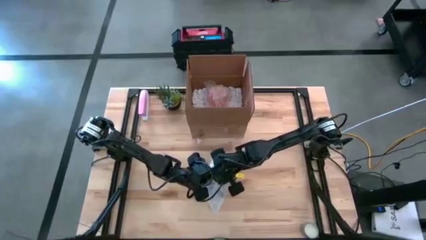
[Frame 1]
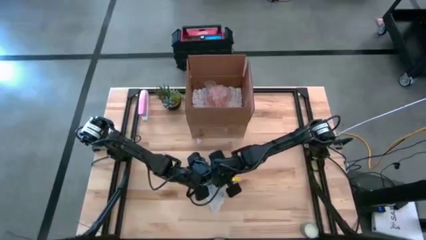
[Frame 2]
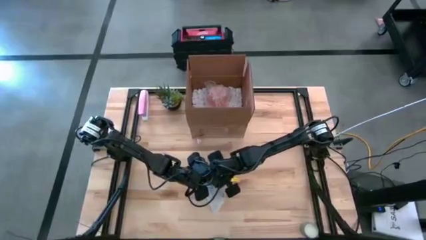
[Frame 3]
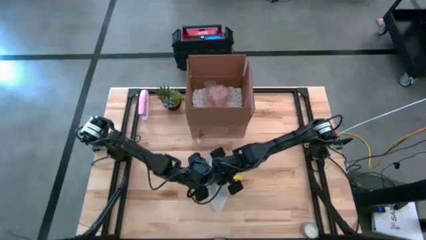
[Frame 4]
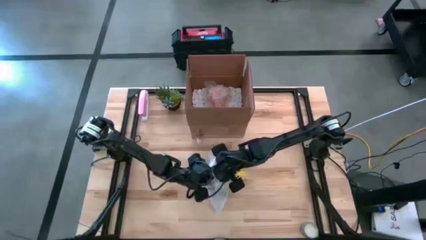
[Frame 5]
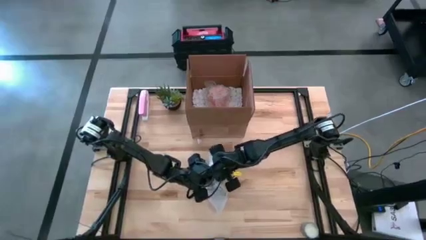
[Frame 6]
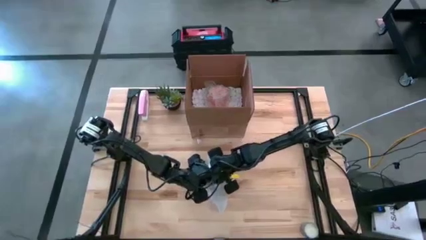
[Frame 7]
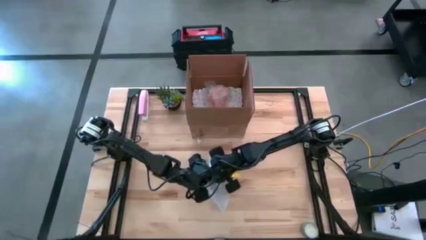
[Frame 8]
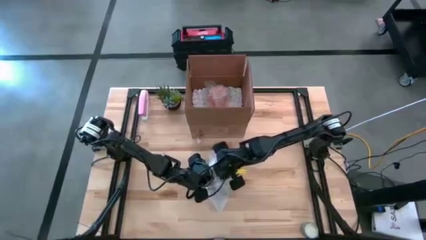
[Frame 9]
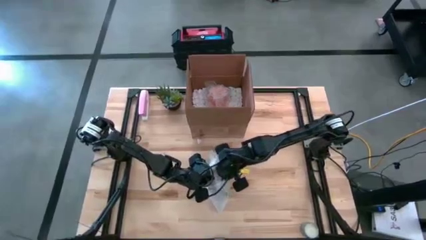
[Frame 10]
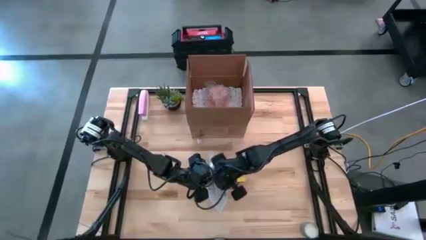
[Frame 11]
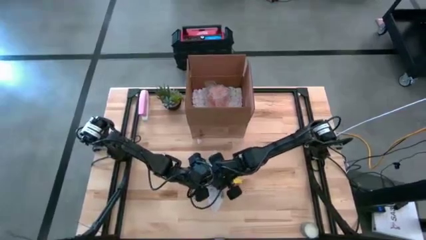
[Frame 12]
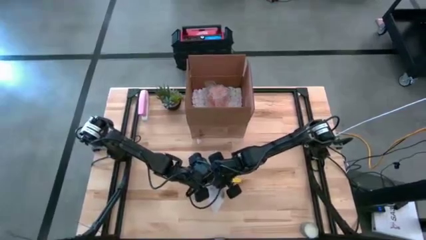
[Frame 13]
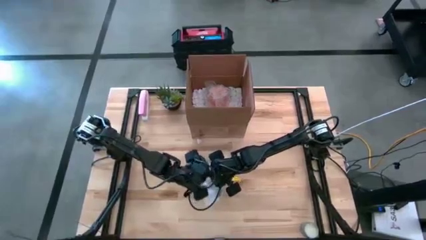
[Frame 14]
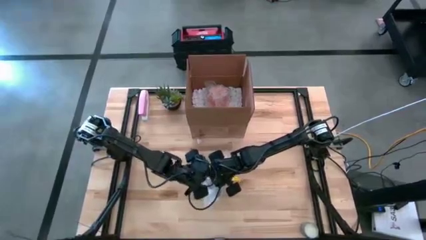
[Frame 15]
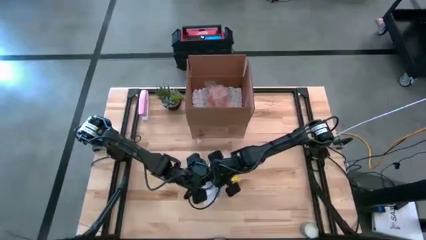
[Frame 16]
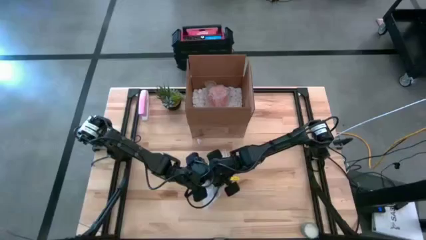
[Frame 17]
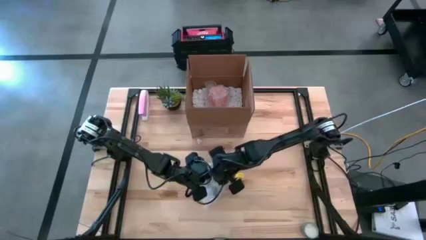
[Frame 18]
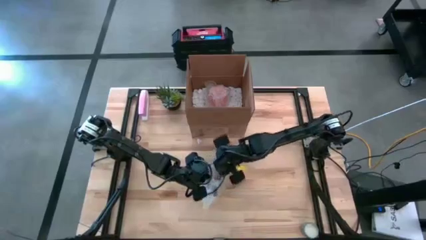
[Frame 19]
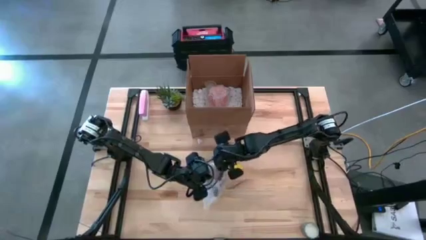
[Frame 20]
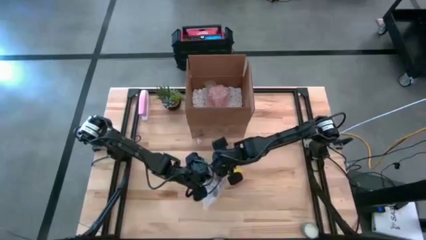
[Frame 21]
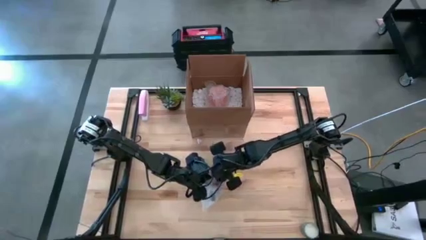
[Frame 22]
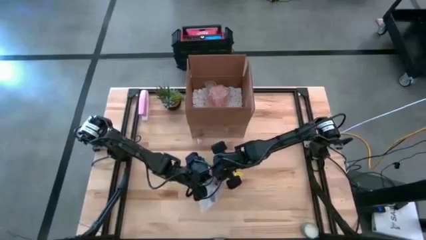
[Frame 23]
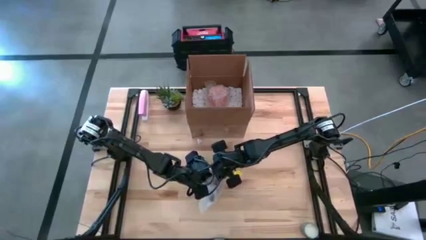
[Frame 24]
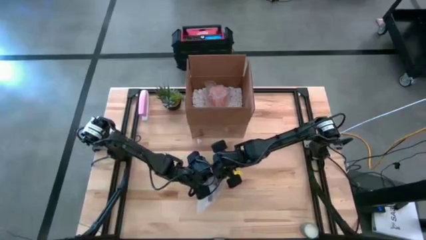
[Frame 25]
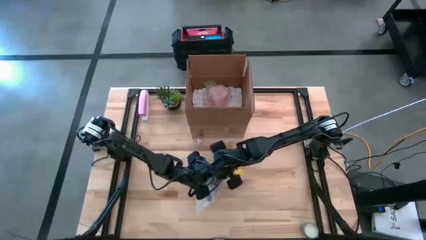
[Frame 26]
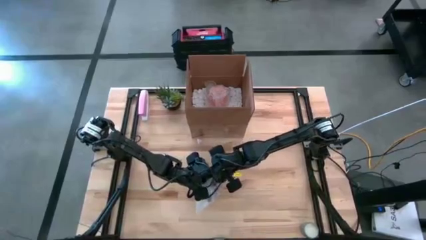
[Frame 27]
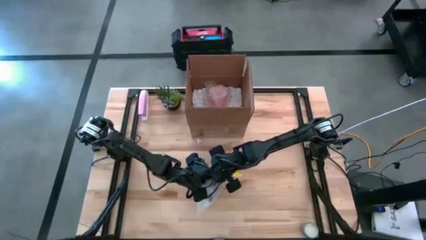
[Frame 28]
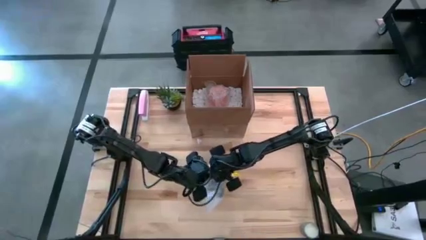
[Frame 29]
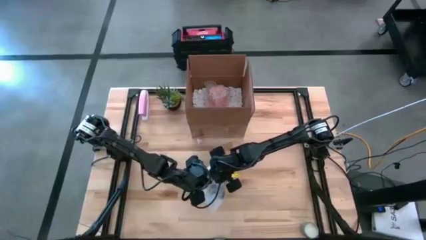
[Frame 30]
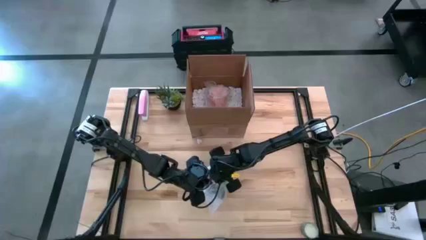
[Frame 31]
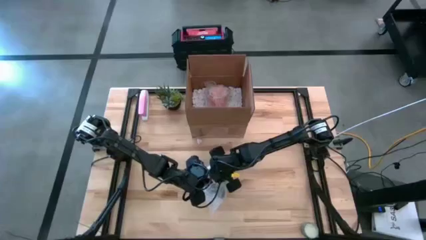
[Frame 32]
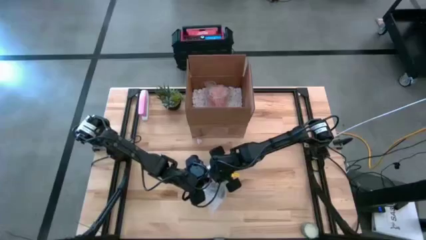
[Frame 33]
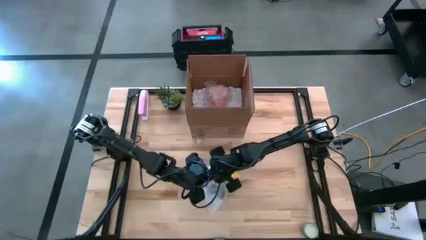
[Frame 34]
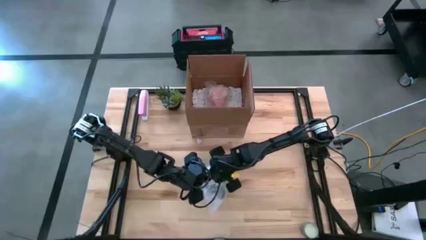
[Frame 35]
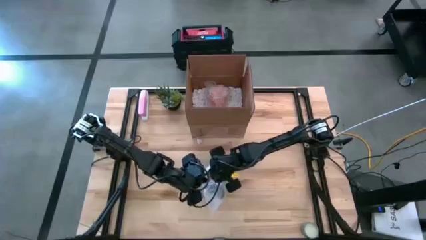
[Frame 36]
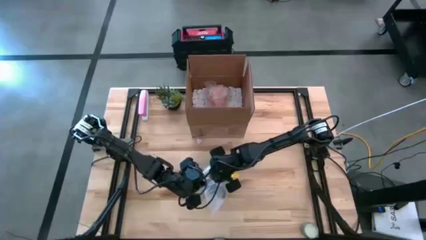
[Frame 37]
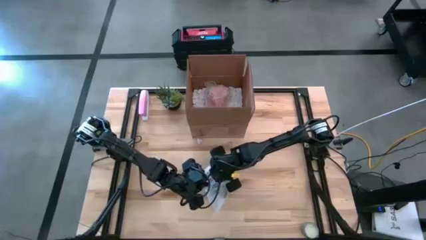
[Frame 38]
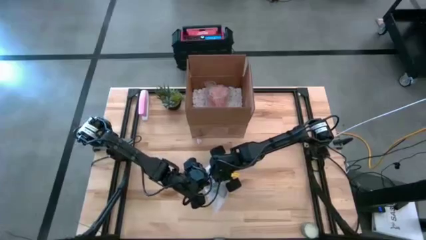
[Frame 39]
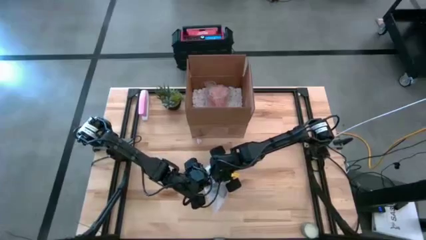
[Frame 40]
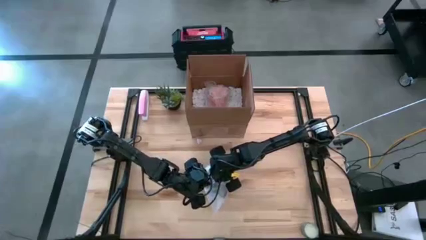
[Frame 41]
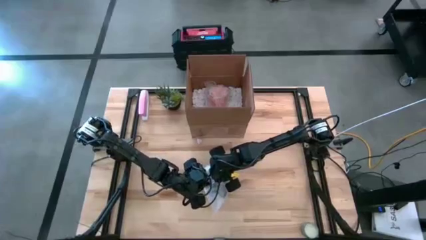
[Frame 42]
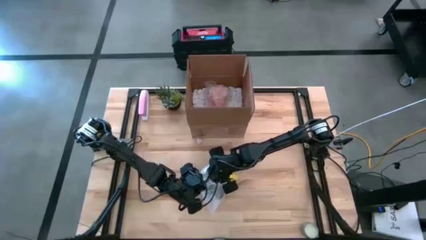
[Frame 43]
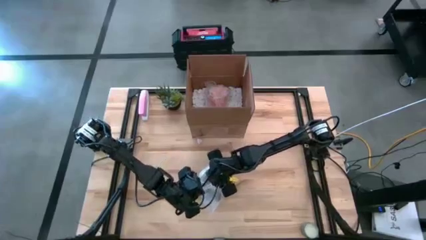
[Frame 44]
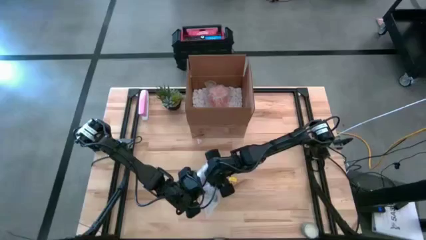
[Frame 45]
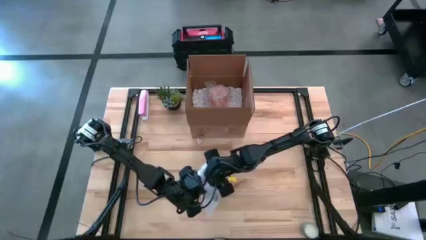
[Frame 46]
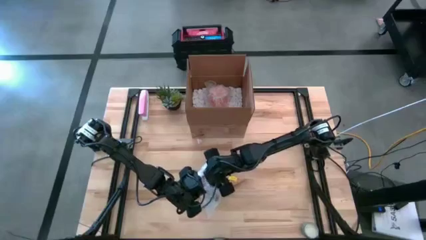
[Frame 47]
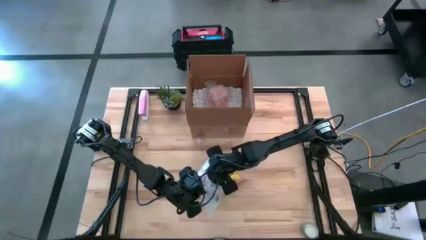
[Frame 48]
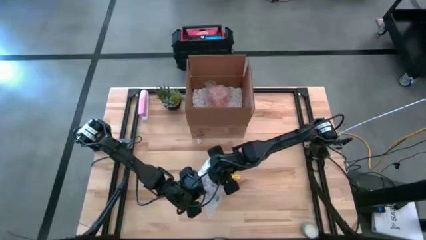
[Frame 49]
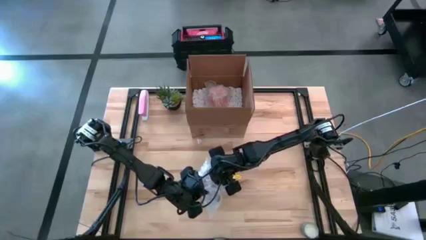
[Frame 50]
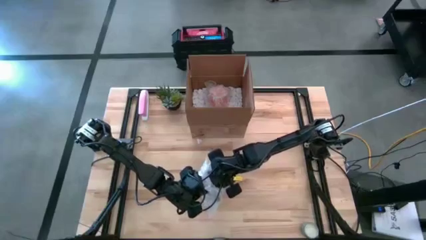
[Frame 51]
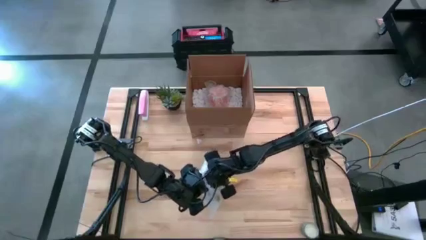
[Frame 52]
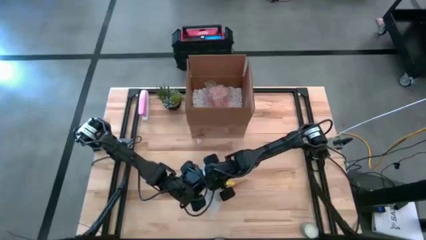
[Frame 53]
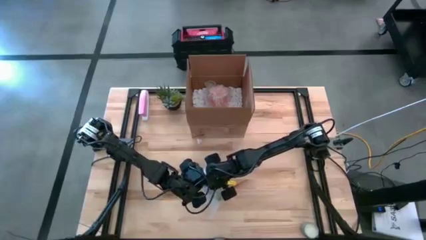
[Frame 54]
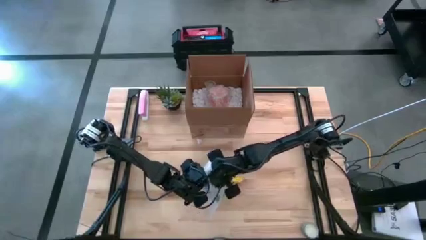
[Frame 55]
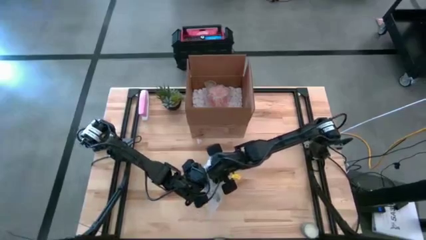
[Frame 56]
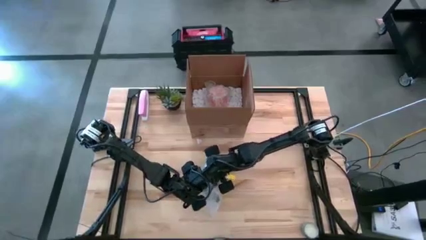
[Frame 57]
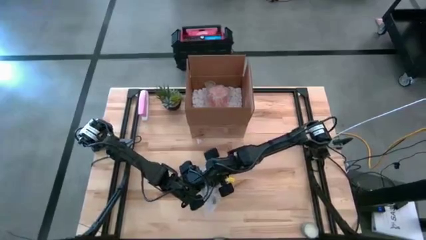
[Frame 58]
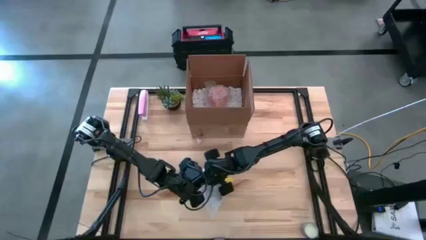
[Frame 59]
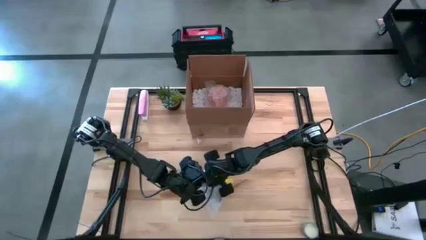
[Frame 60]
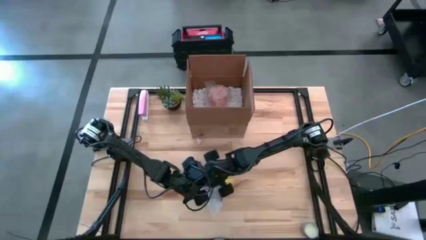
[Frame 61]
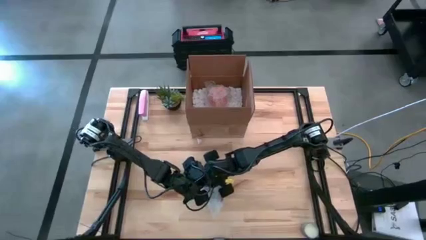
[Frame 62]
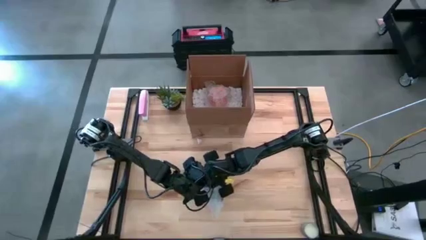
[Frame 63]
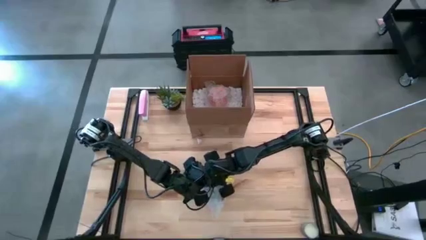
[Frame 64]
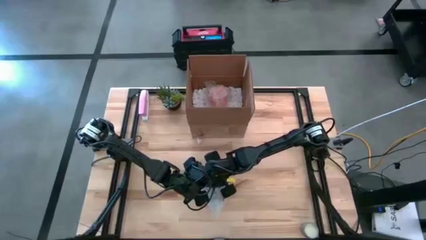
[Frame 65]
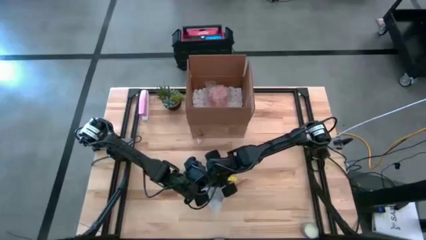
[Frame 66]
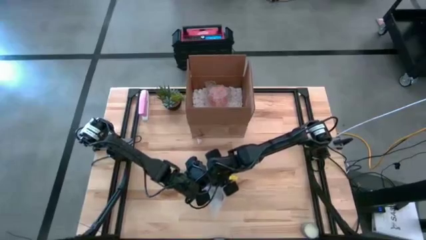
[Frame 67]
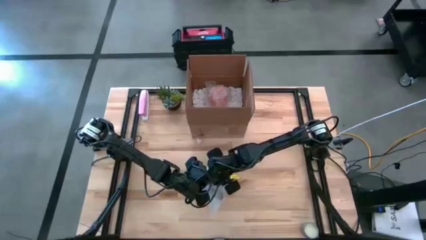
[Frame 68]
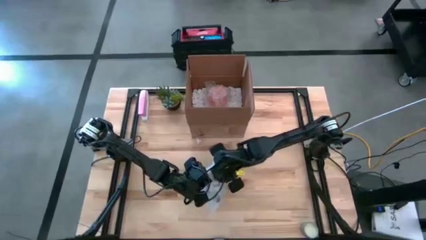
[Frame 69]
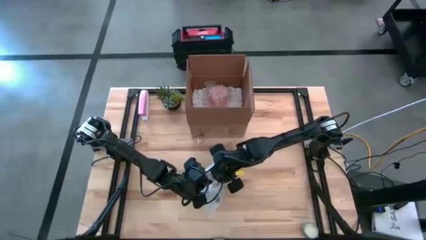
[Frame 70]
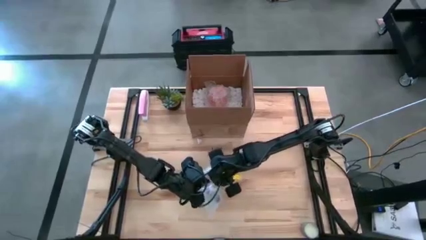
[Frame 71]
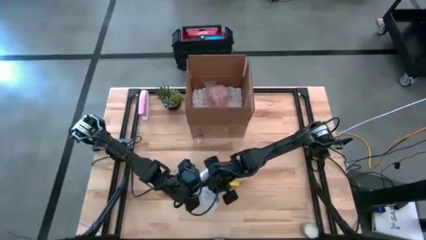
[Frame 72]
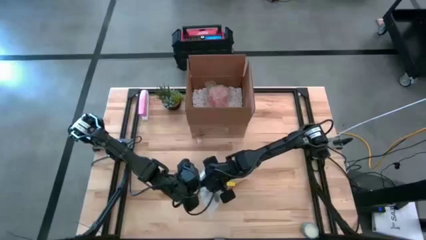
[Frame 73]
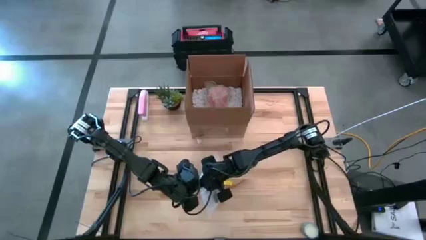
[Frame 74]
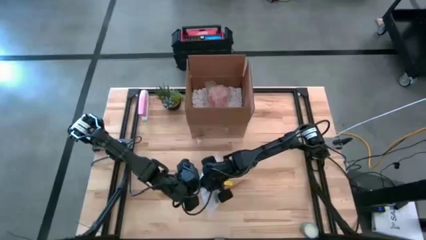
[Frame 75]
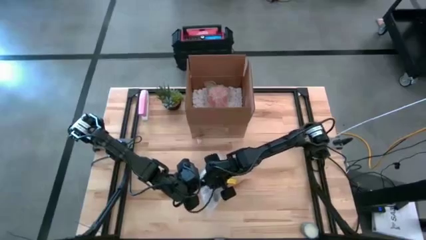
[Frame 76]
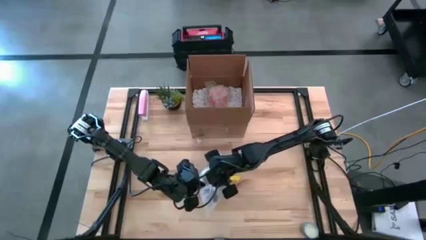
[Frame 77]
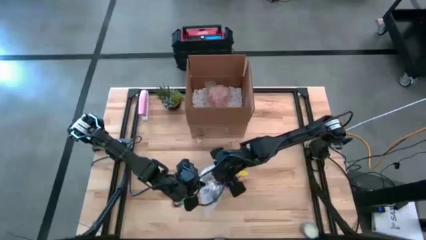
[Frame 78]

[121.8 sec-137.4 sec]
Task: wrap mug
Wrap the black mug with the bubble wrap

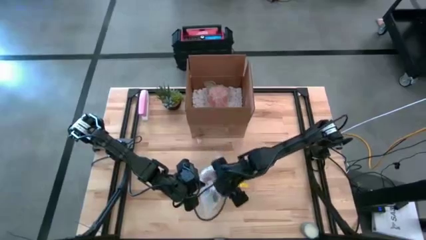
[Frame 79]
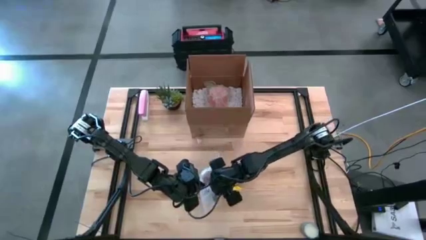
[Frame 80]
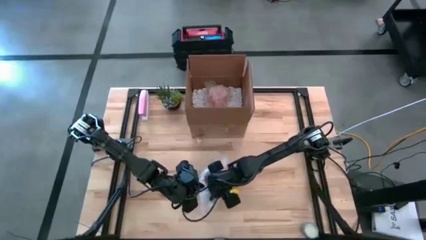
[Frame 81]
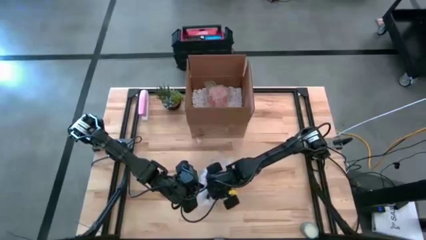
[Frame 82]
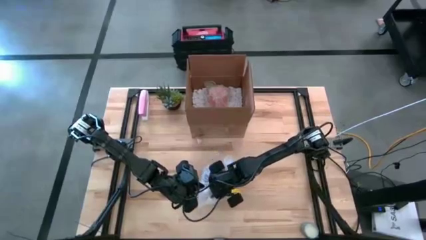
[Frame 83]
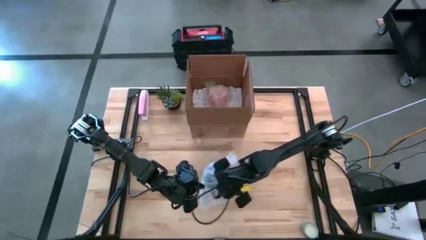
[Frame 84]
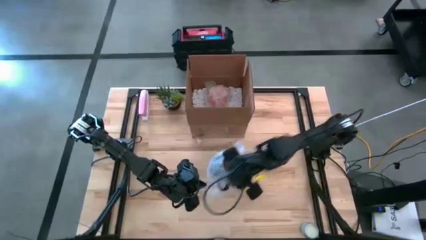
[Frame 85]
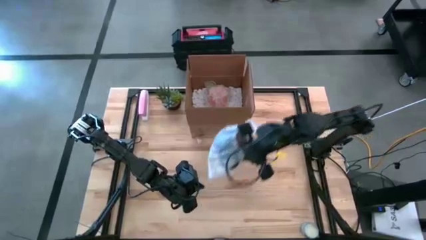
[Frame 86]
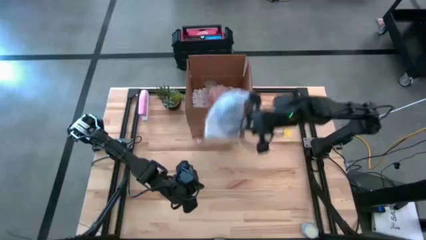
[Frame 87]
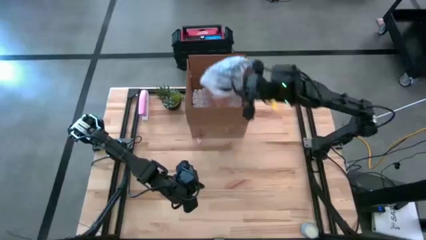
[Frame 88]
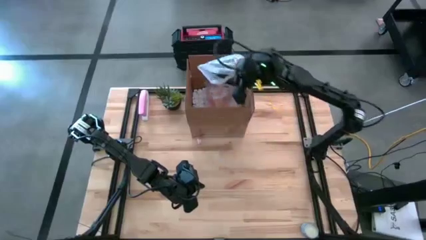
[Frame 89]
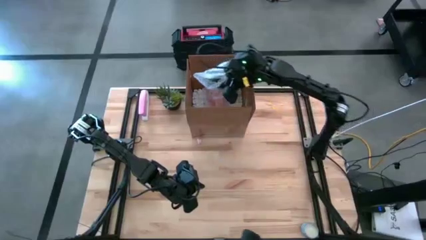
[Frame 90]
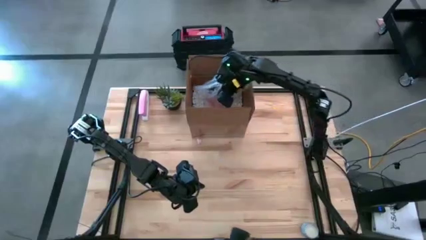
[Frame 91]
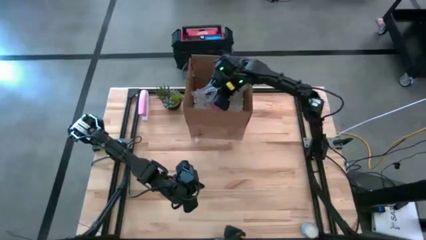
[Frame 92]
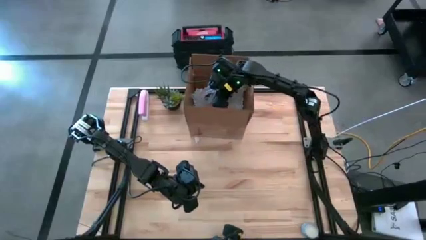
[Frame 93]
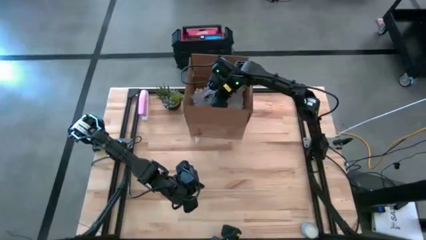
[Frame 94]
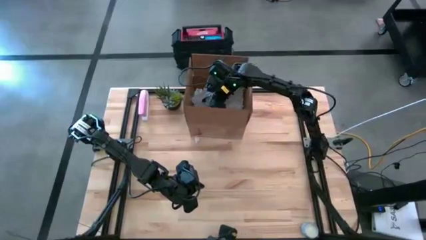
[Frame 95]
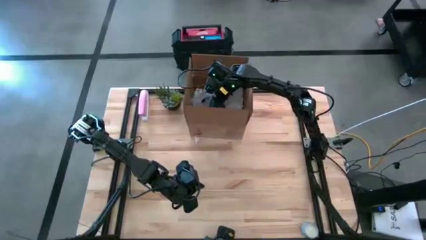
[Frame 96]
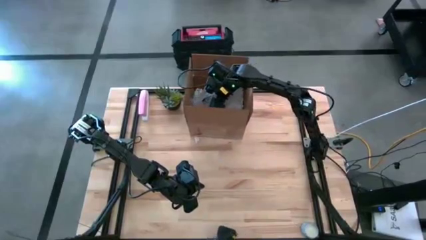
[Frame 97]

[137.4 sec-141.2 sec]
Put the wrapped black mug into the box
